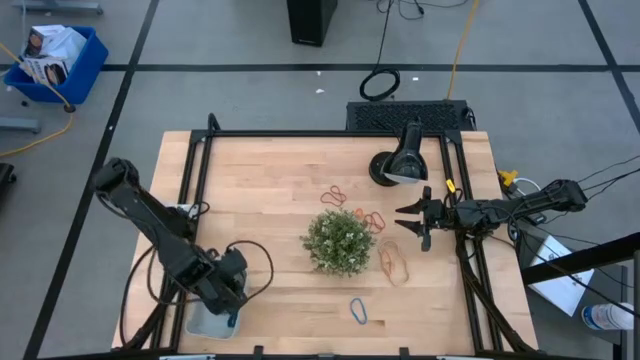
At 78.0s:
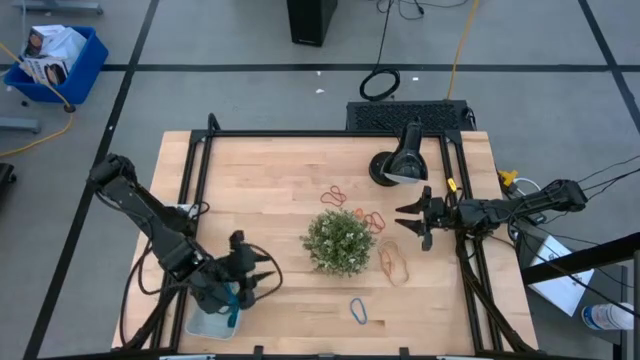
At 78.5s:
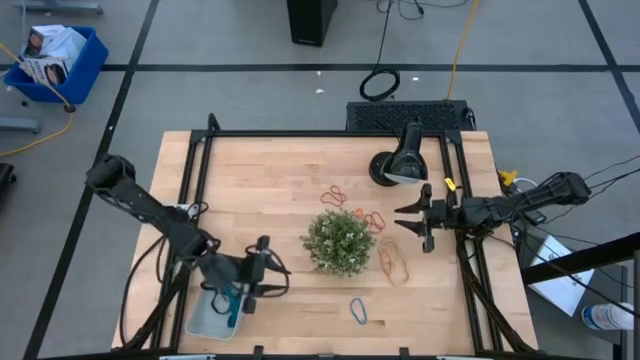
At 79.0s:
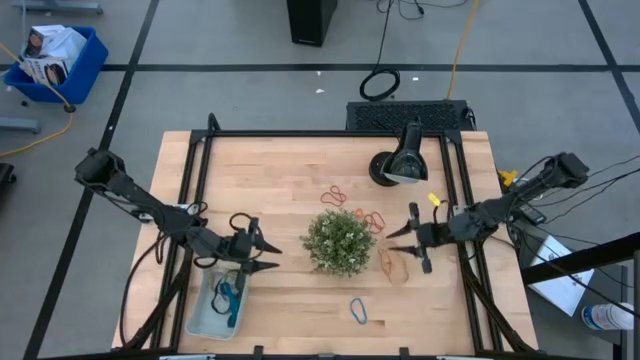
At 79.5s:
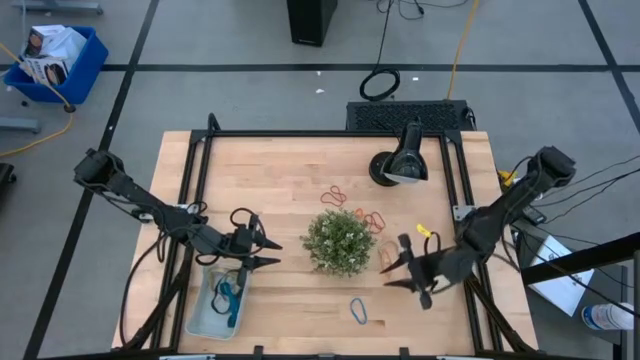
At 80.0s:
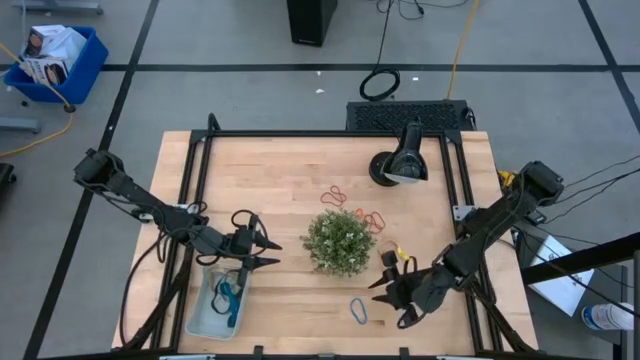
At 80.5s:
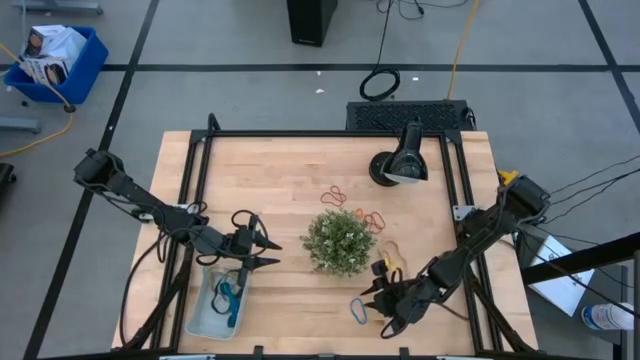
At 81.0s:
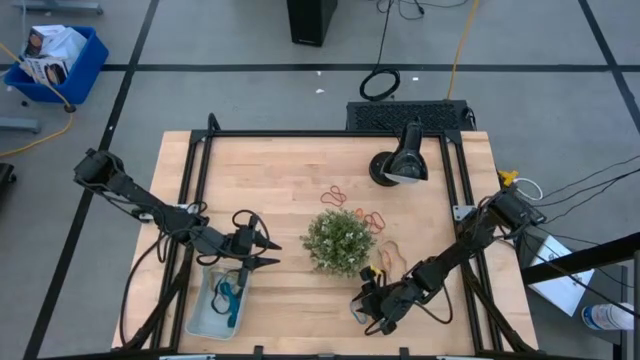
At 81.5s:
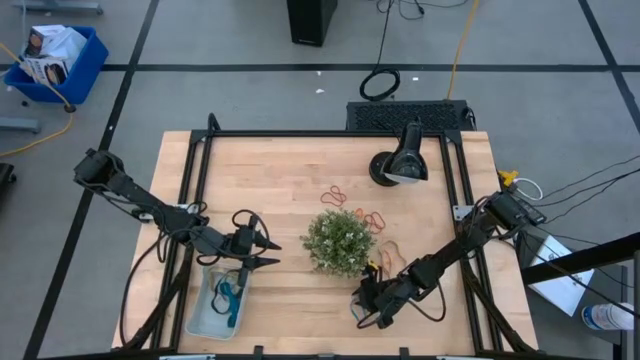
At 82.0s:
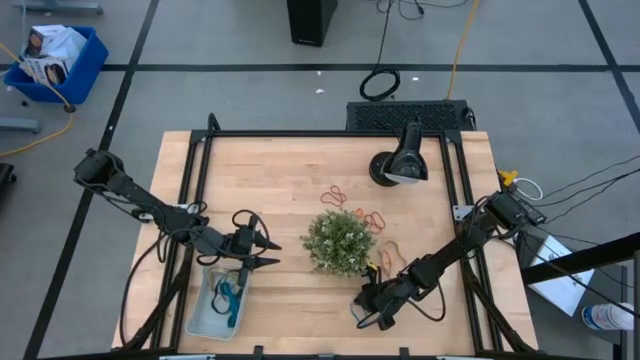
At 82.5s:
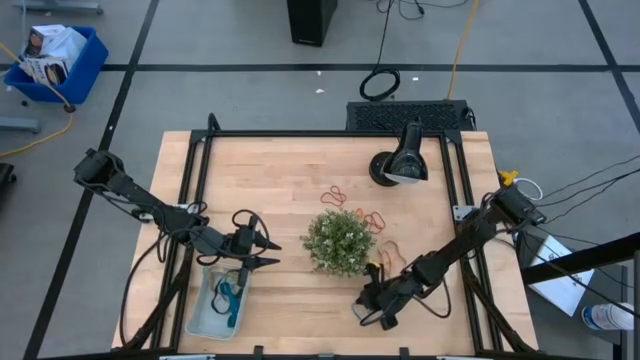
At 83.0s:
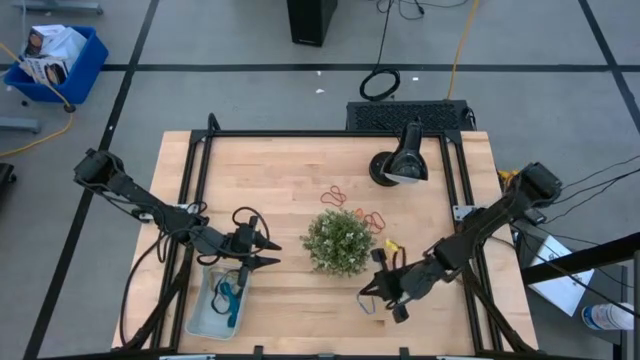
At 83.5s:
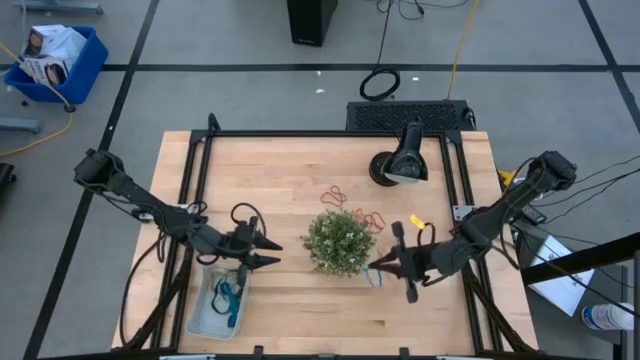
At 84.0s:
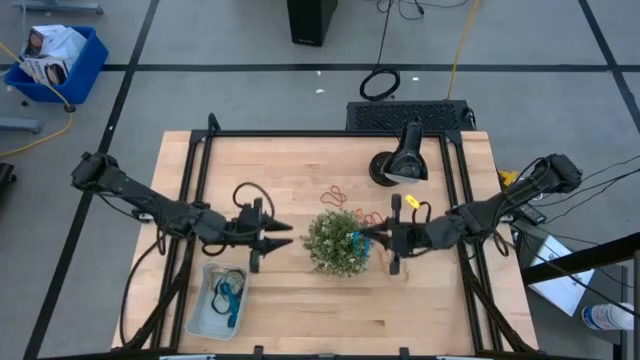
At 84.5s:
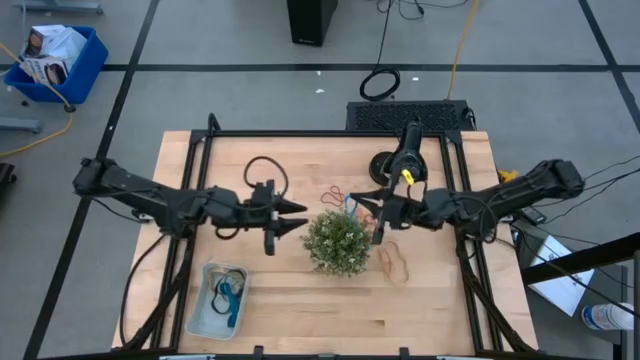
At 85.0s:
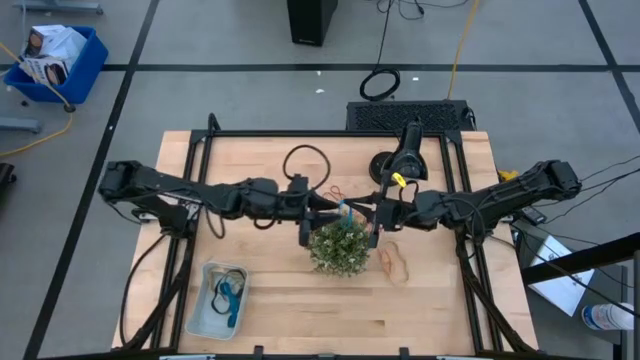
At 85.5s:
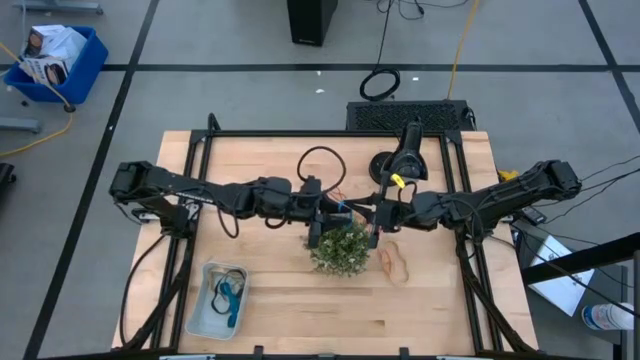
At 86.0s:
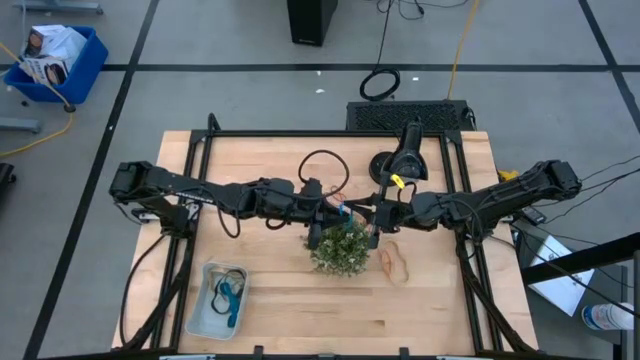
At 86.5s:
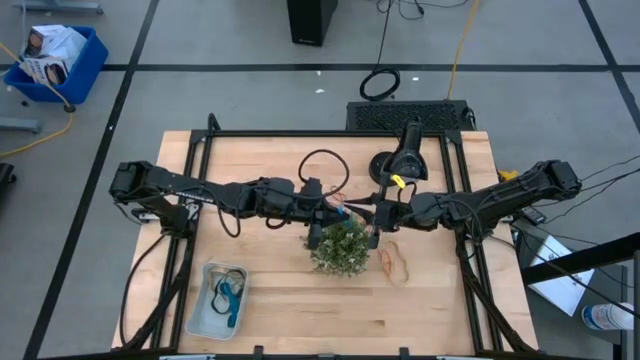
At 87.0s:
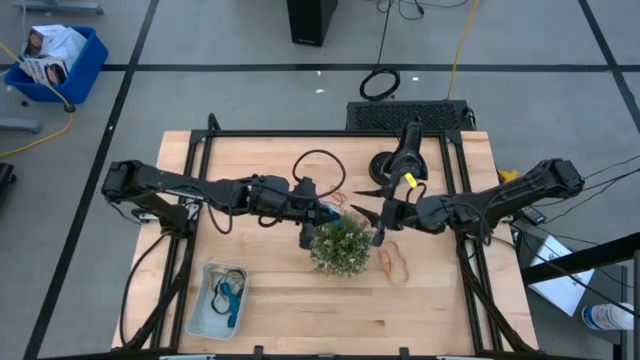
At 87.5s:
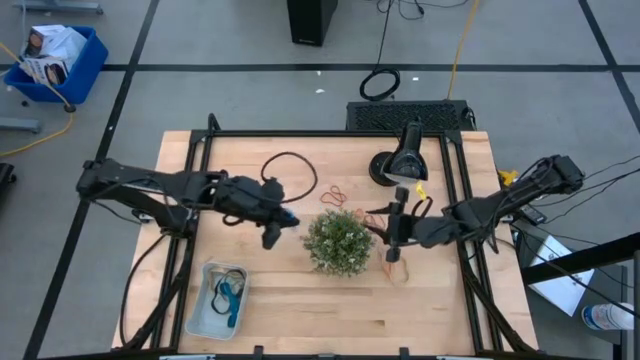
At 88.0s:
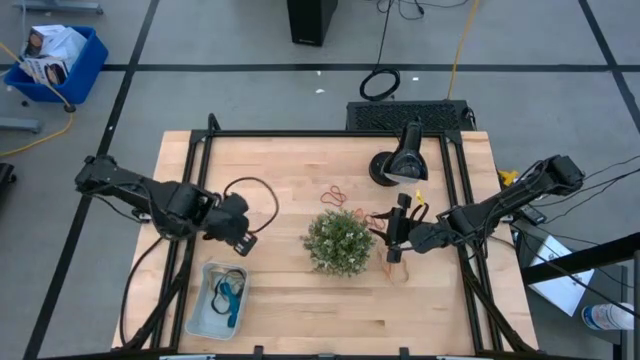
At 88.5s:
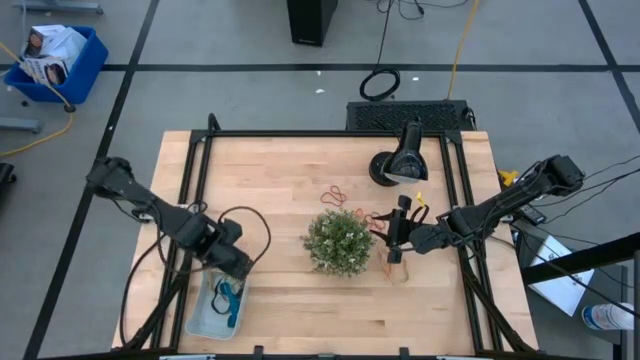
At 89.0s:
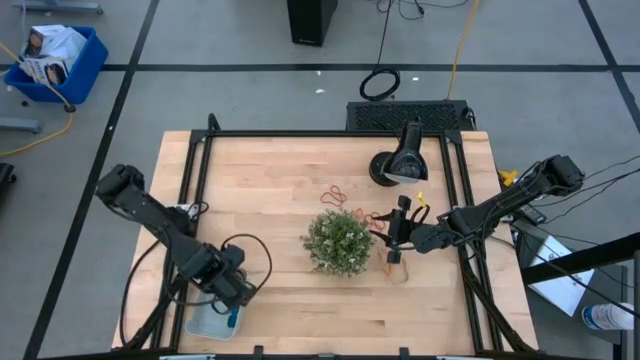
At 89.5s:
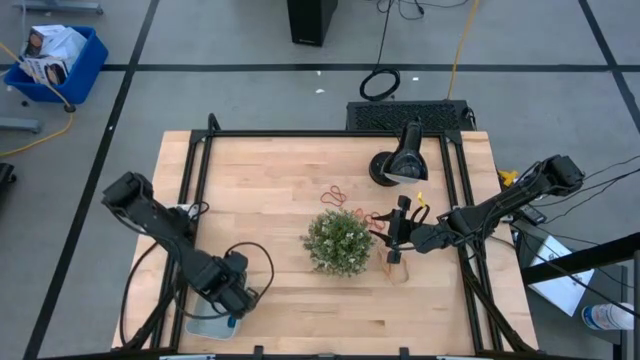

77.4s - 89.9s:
Task: Pick and place rubber bands into bin
Put the blue rubber band into the blue bin

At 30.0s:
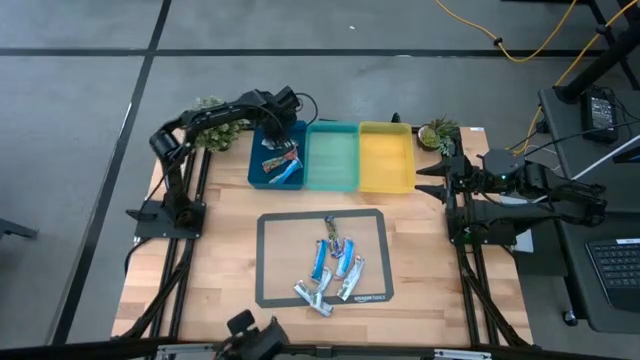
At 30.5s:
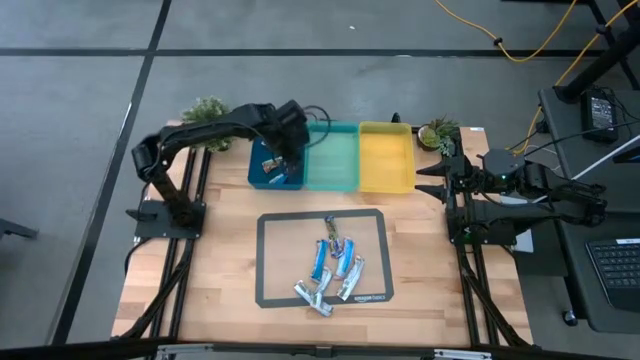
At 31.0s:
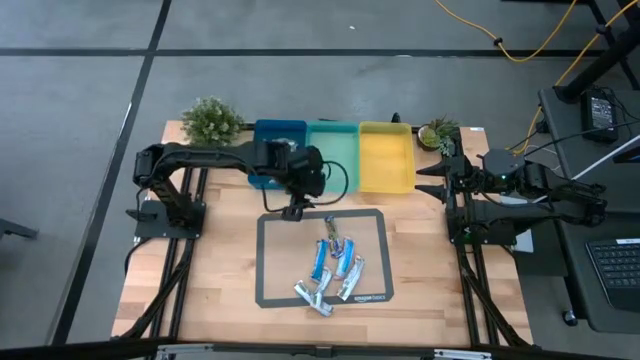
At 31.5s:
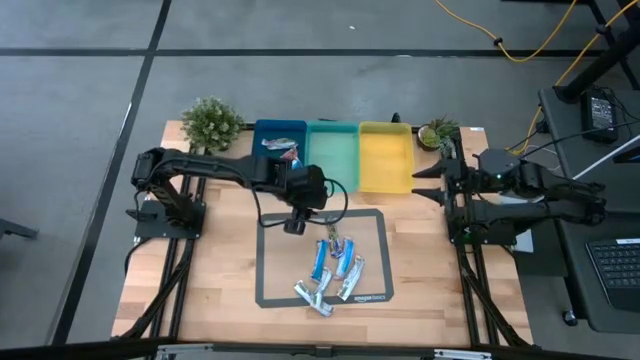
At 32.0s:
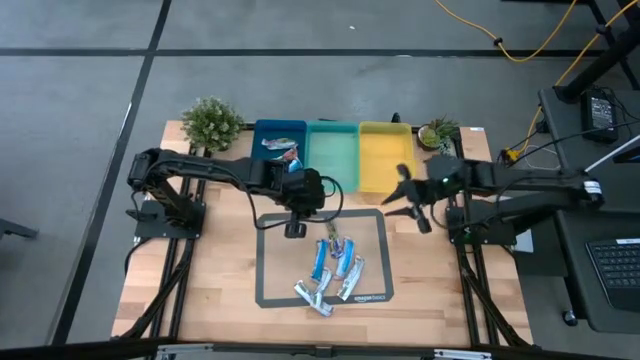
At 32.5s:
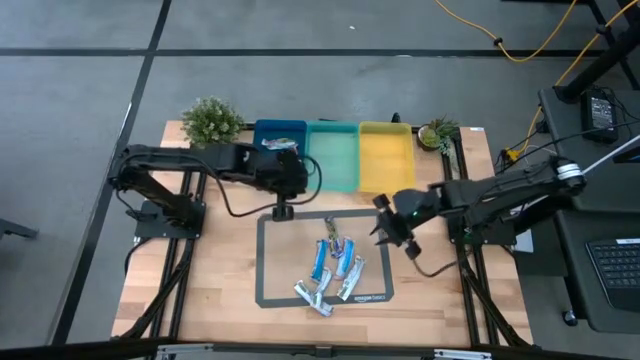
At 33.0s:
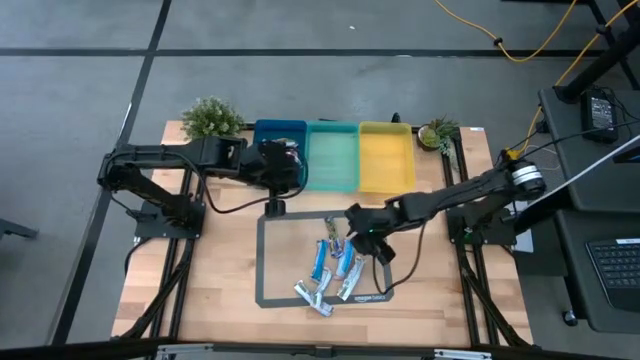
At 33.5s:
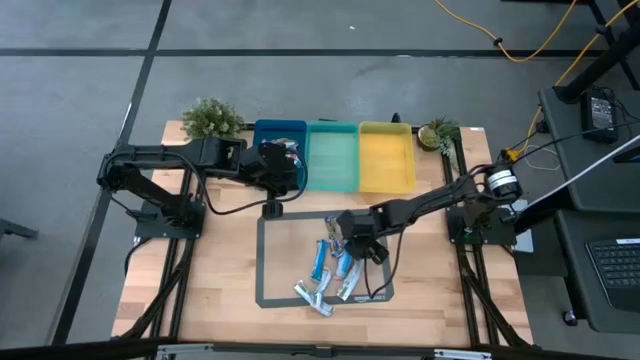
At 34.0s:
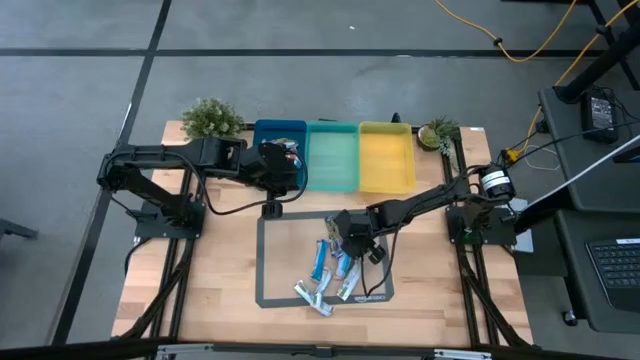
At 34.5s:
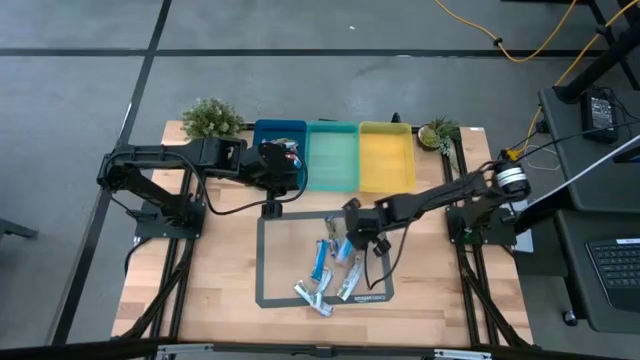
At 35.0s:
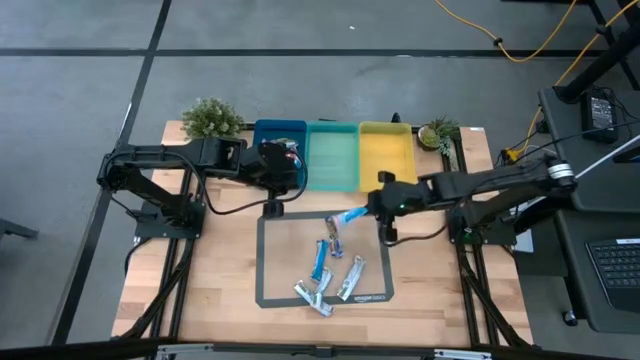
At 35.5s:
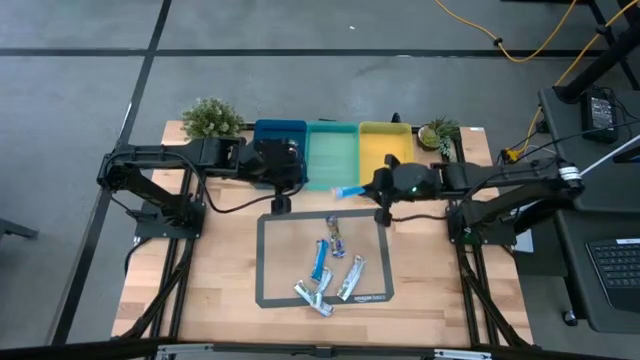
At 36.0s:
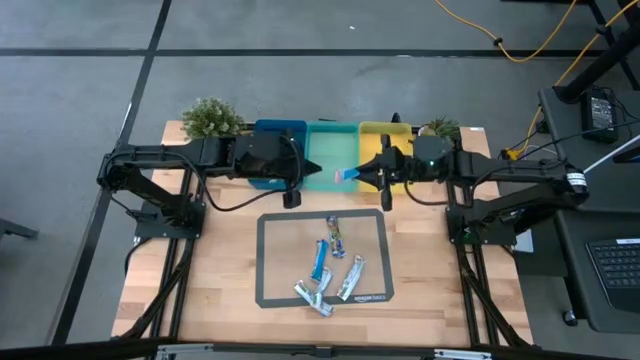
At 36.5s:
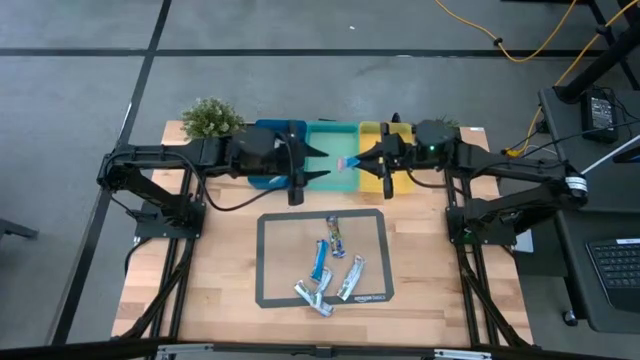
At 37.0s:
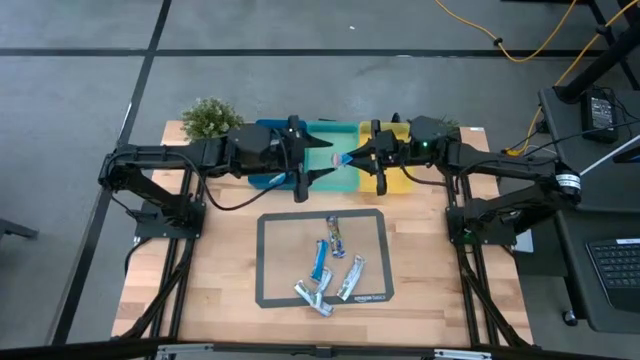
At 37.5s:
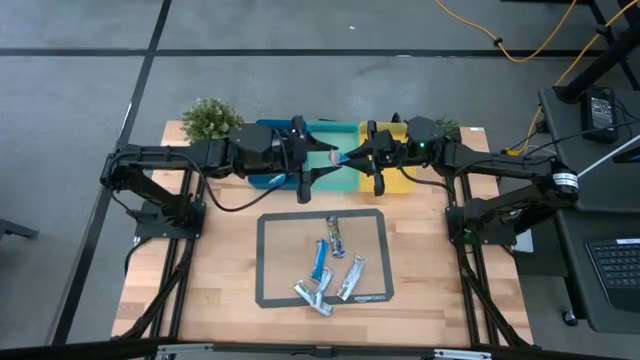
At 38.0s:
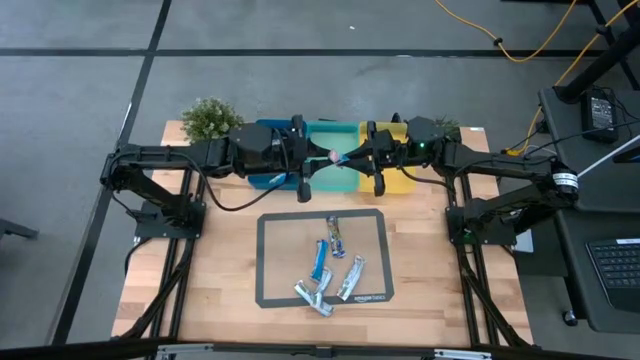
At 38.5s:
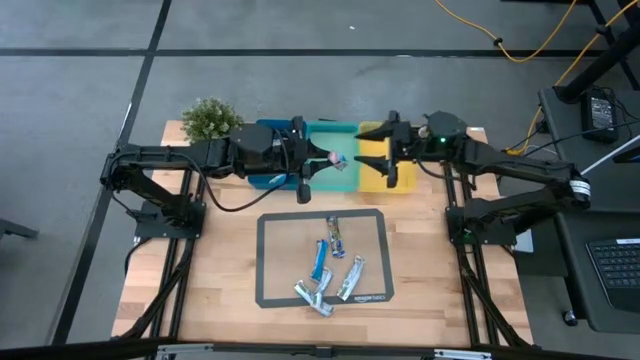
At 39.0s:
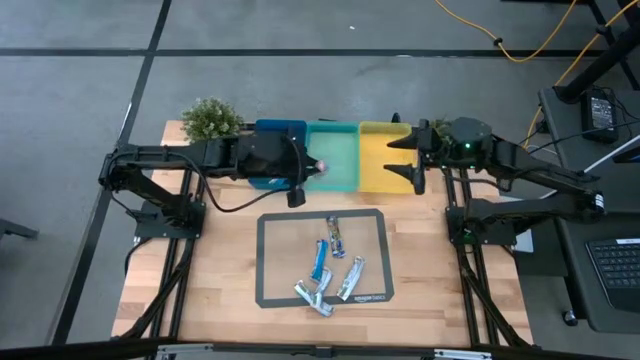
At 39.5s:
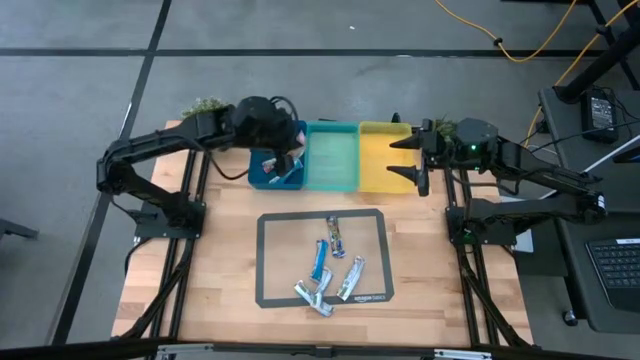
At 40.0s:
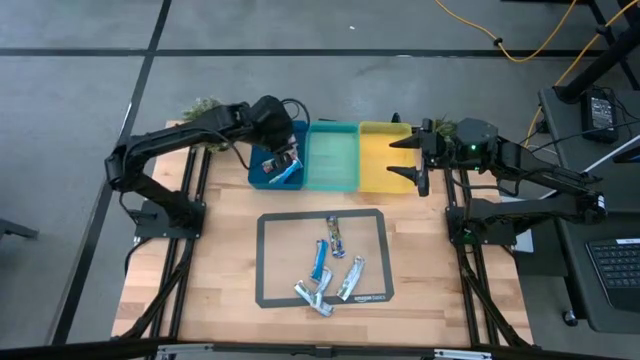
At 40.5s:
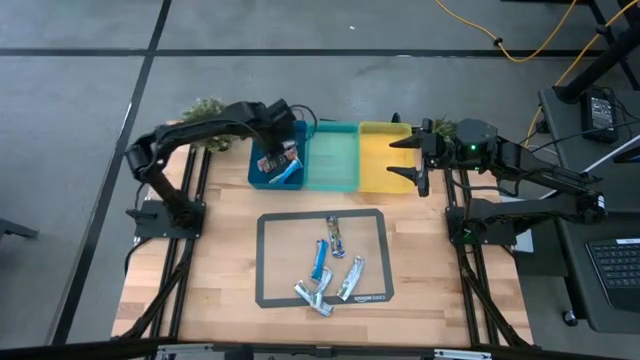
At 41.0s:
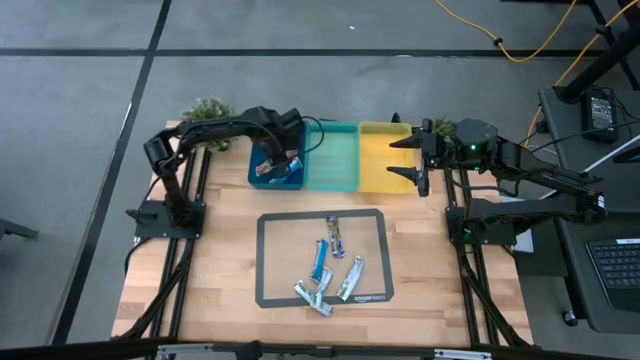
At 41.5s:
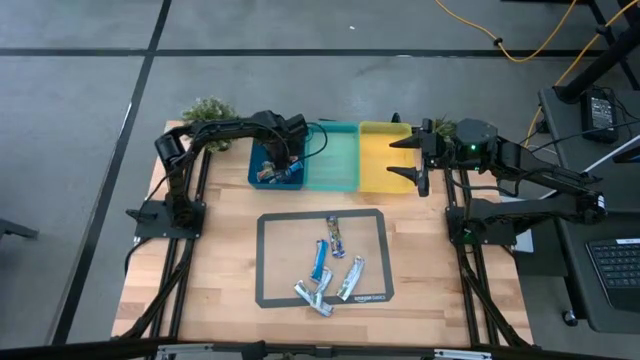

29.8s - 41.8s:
Task: Pick and place Granola Bars by type
Put the red granola bar into the blue bin
